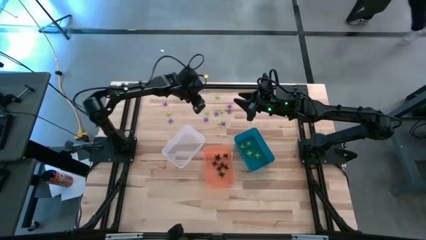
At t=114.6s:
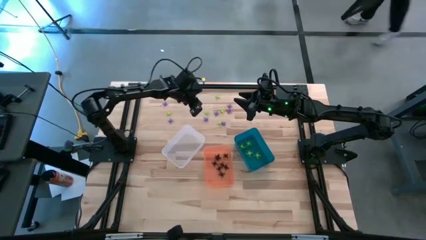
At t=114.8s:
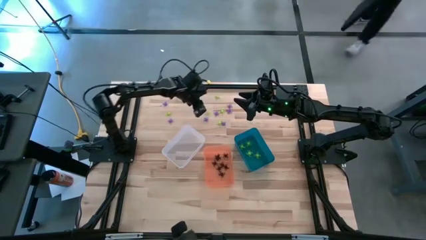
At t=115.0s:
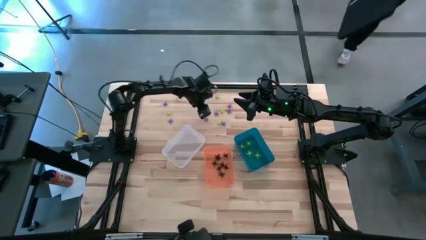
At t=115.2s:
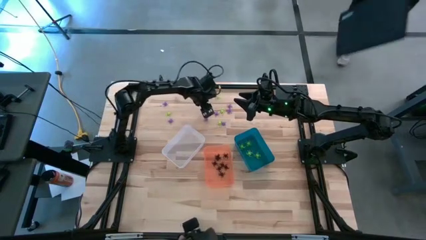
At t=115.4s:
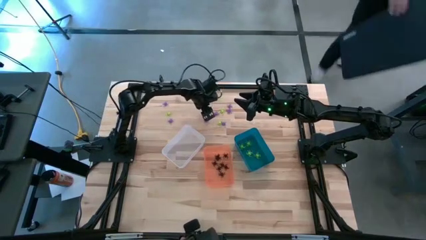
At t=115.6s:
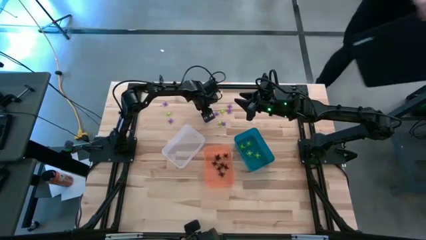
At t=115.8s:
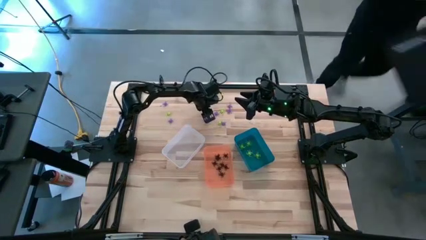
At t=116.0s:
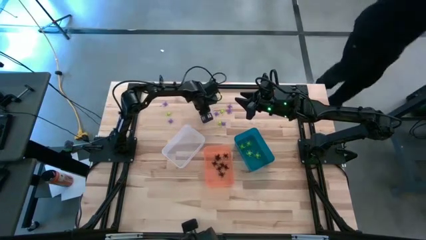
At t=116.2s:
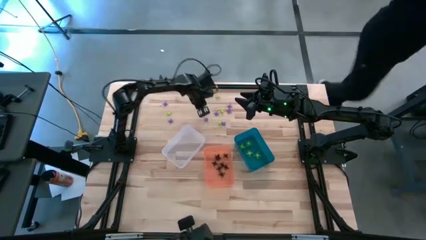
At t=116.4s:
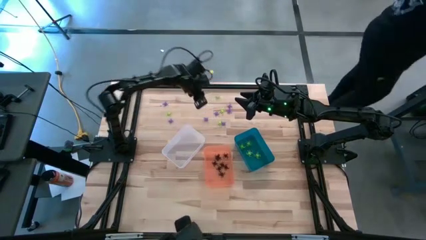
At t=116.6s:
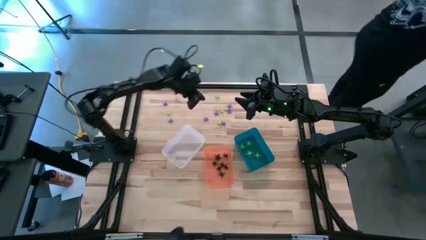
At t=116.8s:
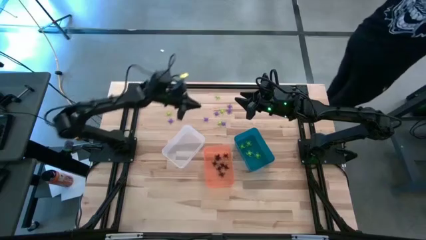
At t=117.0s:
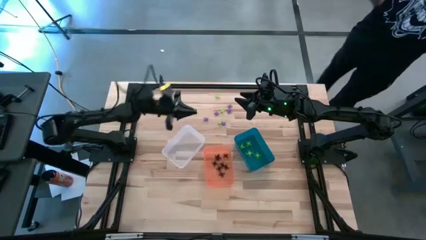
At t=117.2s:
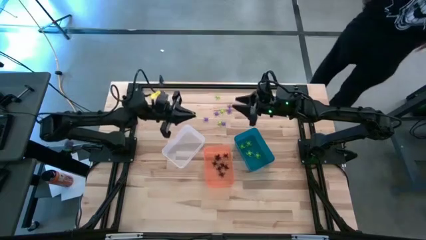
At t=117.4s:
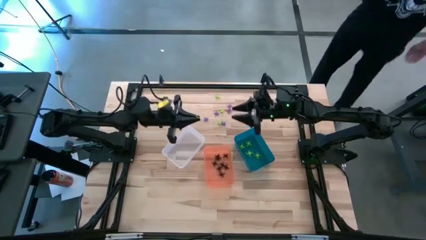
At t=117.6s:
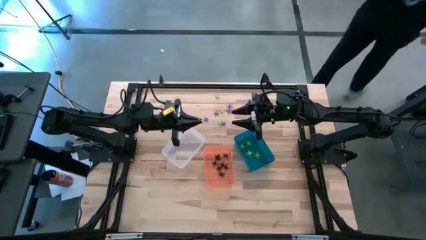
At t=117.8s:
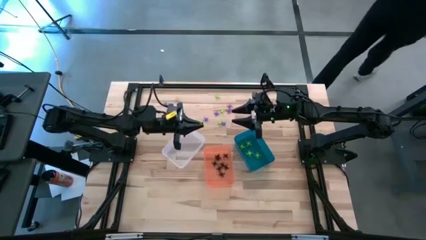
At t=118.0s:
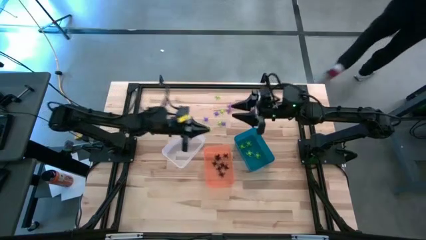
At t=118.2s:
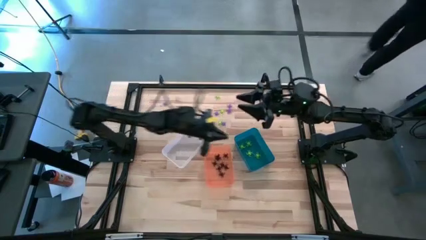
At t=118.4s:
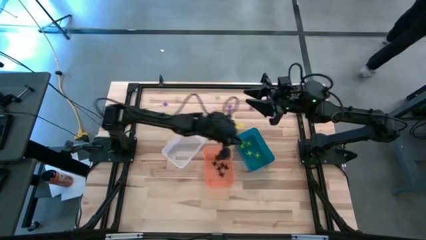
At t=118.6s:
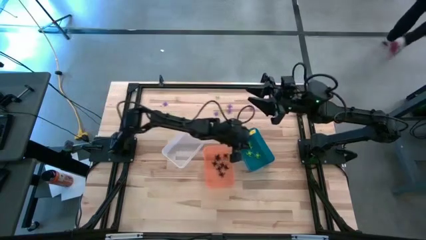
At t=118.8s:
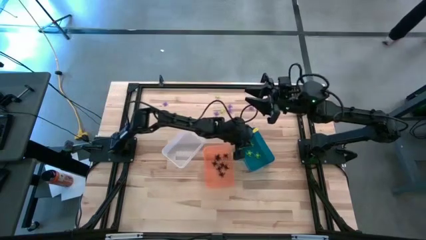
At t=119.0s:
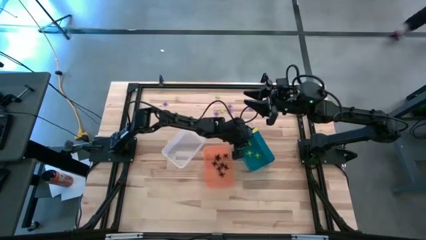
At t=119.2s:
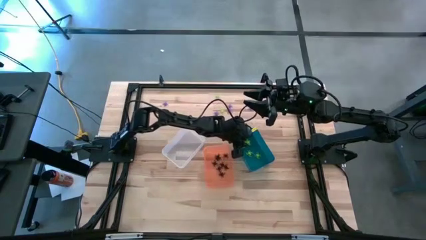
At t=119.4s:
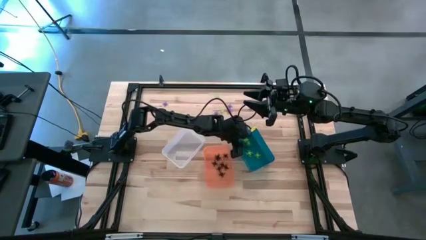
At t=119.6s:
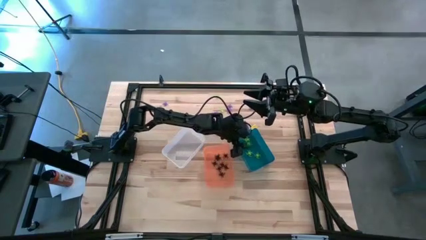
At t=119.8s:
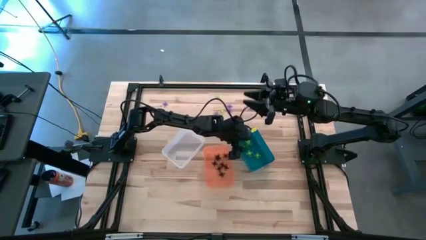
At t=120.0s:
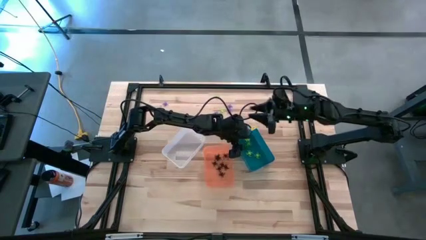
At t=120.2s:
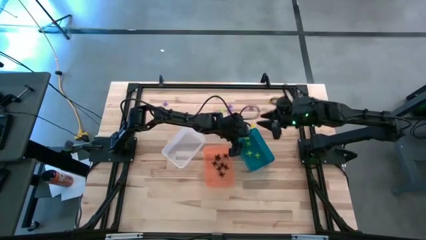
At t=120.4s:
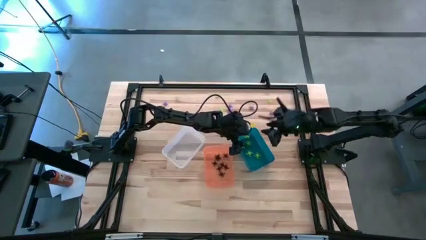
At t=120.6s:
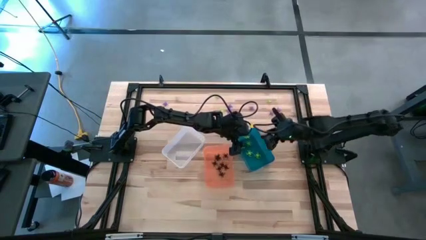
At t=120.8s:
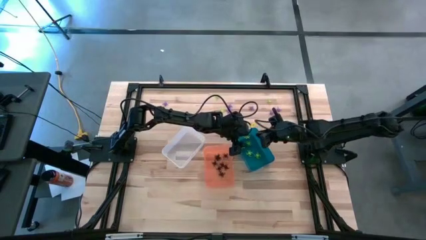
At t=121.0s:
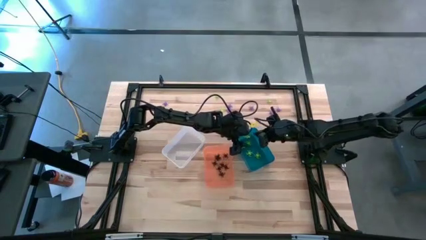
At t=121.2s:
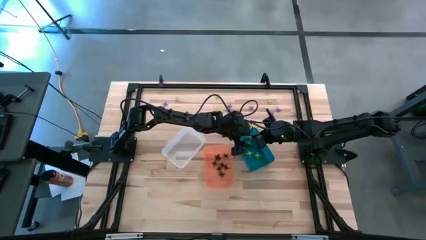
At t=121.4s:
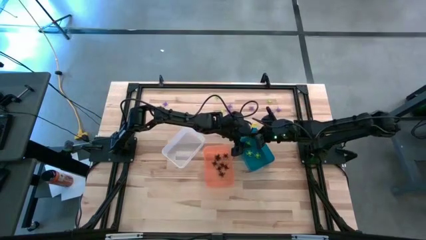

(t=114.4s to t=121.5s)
Task: Sort Halloween decoration
Put the green spider toy into the blue bin

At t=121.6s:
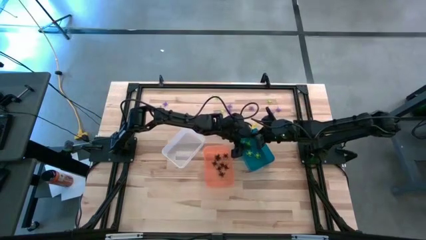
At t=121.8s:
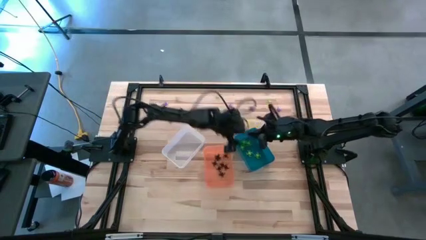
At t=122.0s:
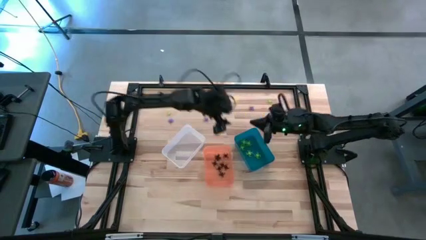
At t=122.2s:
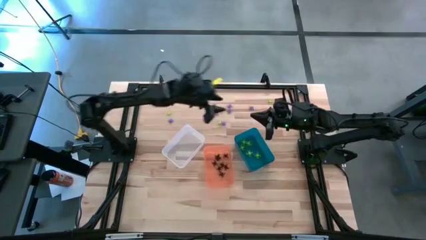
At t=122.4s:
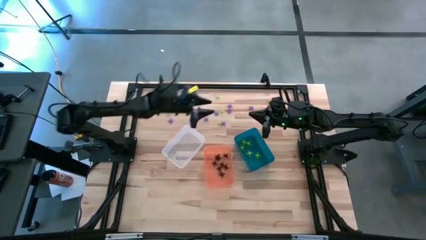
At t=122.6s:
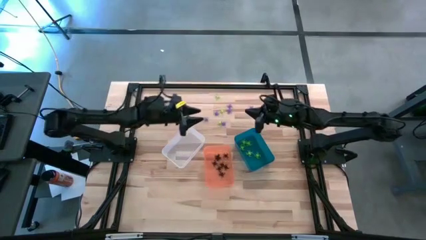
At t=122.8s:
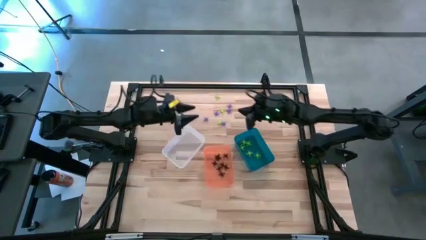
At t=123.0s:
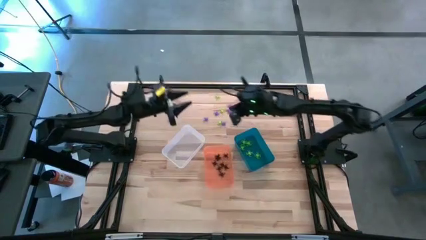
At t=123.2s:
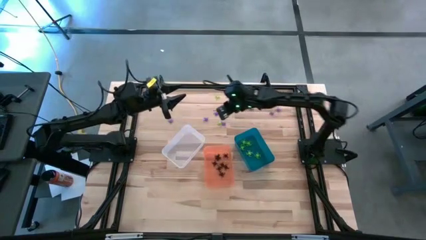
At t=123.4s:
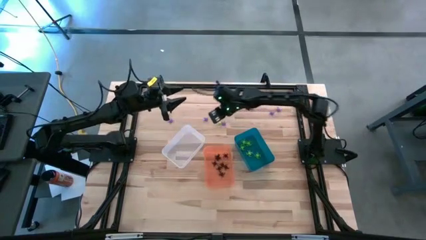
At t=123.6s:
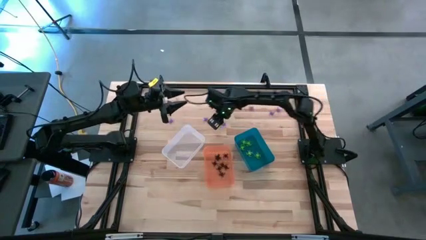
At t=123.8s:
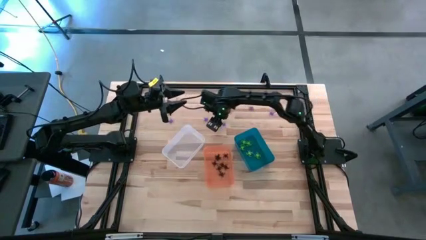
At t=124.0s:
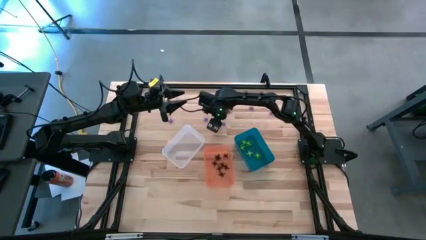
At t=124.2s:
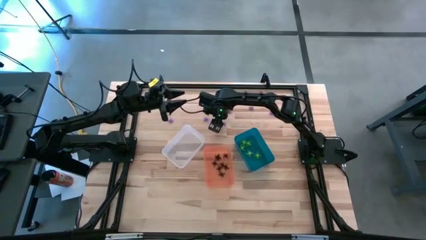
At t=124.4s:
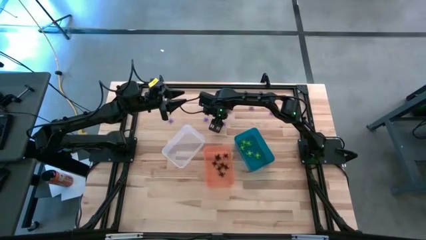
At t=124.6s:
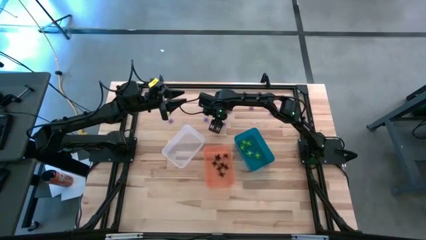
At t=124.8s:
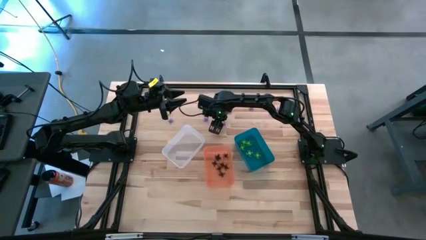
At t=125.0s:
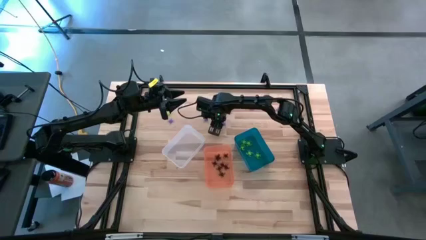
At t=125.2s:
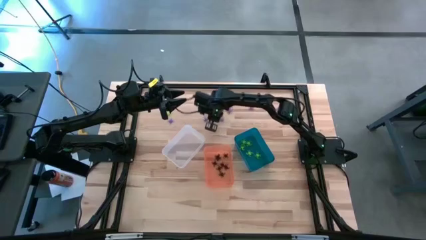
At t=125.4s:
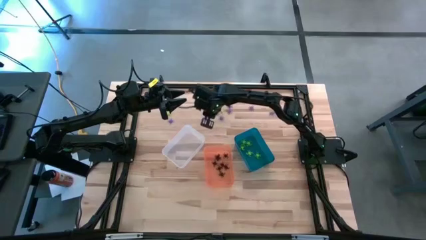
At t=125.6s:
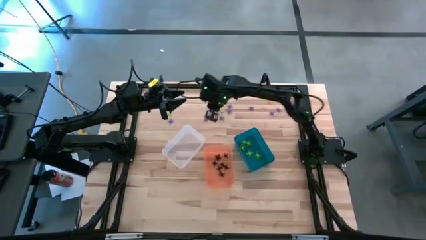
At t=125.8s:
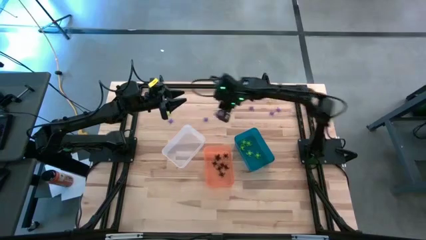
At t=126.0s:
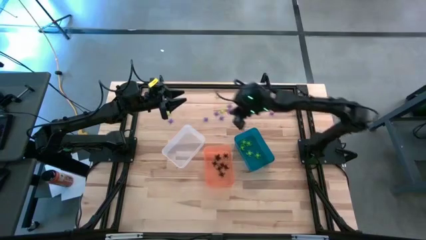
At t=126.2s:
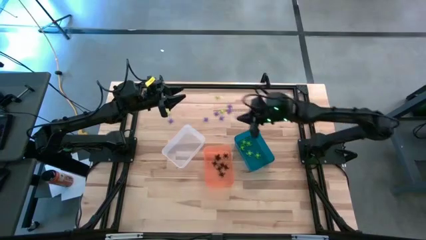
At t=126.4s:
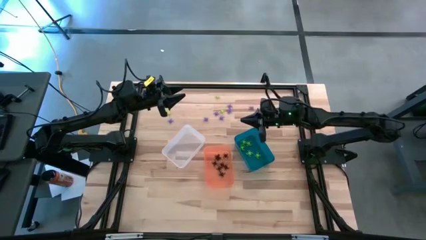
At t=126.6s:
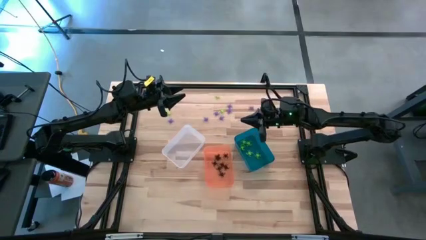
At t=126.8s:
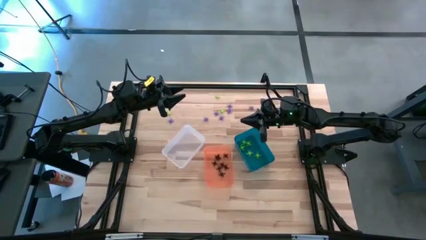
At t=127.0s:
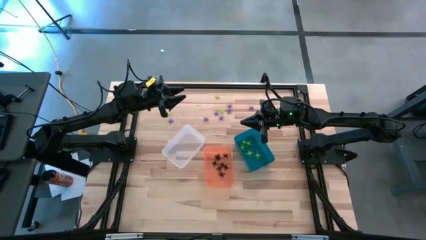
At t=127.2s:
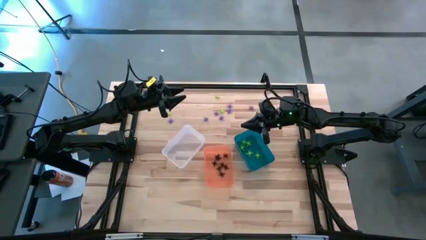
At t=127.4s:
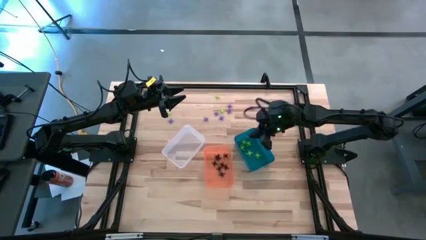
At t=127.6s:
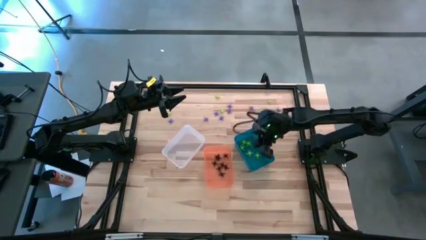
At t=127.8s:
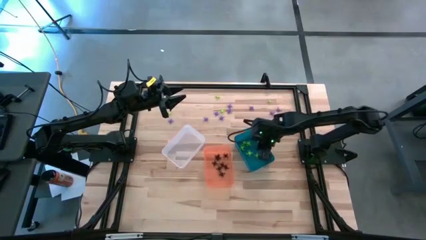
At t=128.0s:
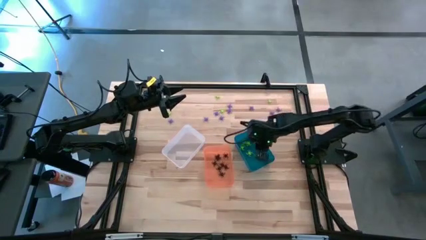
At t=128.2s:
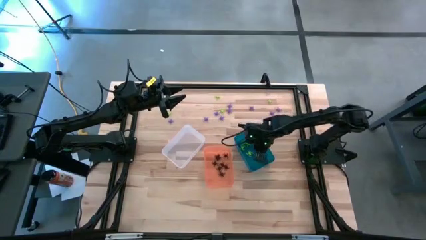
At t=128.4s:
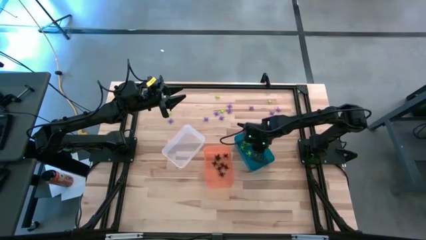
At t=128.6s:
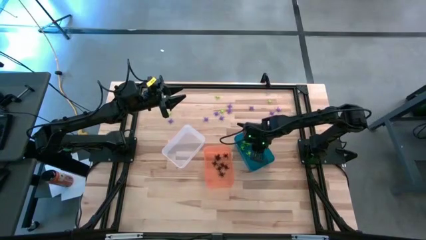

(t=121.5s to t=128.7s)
Put the green spider toy into the blue bin

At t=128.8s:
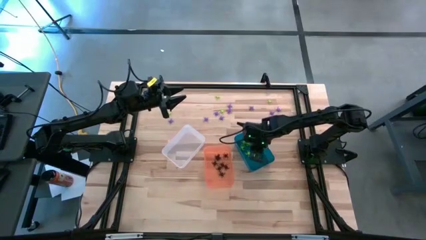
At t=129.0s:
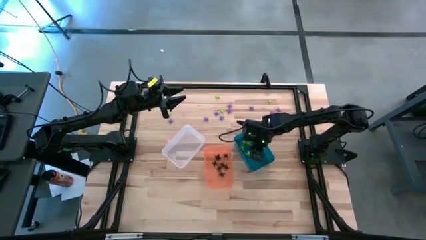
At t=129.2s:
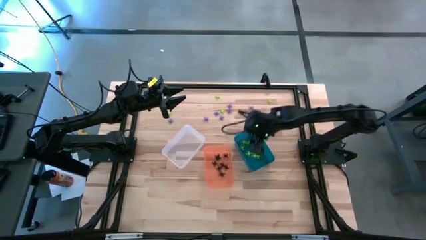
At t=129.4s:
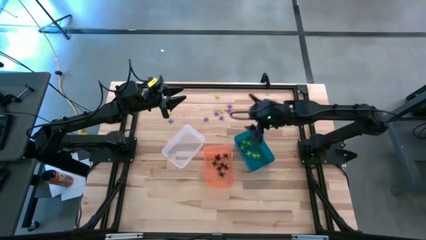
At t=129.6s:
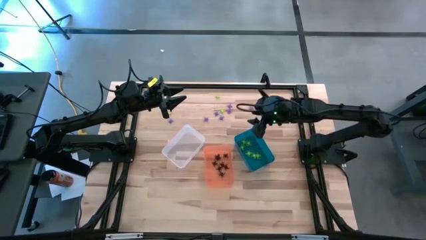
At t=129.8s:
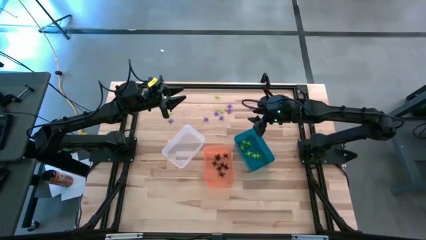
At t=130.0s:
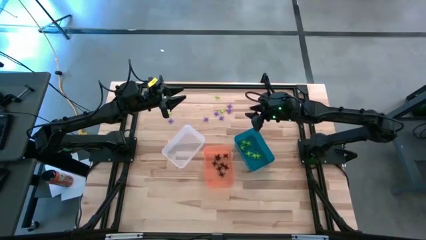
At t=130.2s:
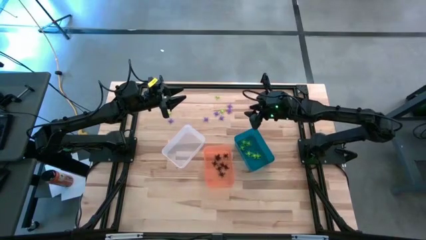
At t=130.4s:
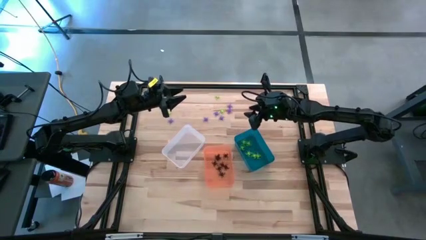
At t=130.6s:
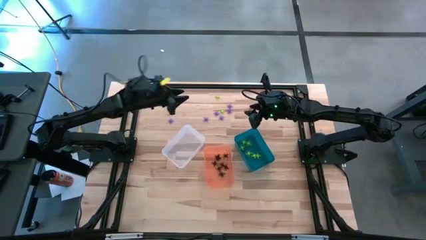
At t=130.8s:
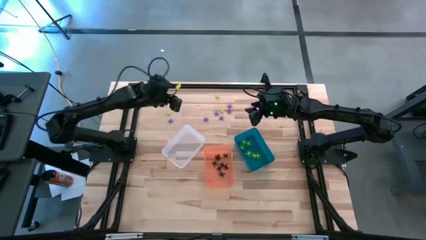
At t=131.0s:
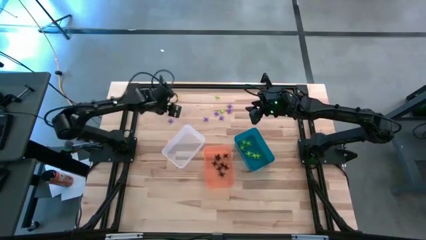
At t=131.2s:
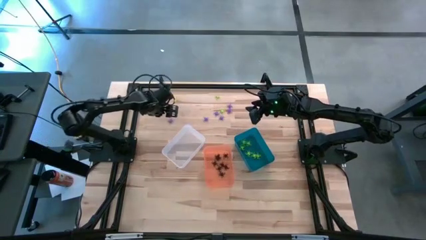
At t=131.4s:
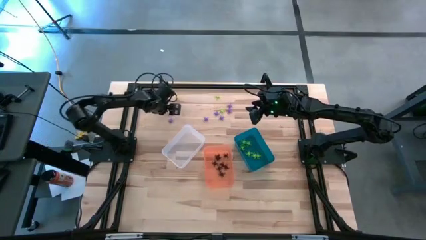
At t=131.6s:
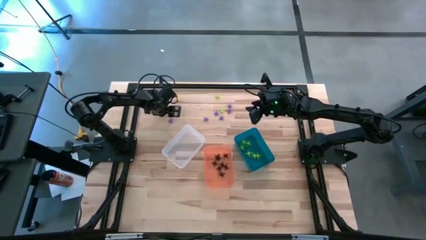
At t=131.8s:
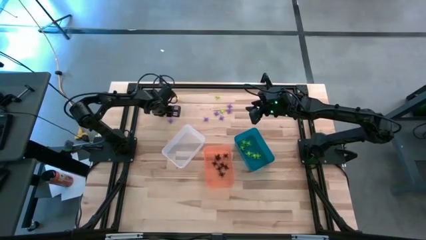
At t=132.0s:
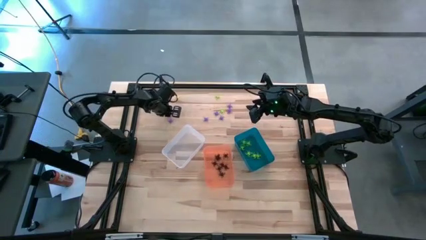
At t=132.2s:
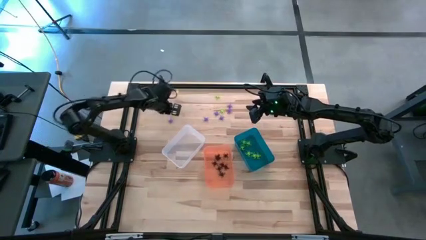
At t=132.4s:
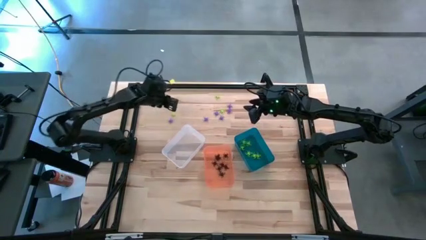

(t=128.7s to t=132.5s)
Put the green spider toy into the blue bin
